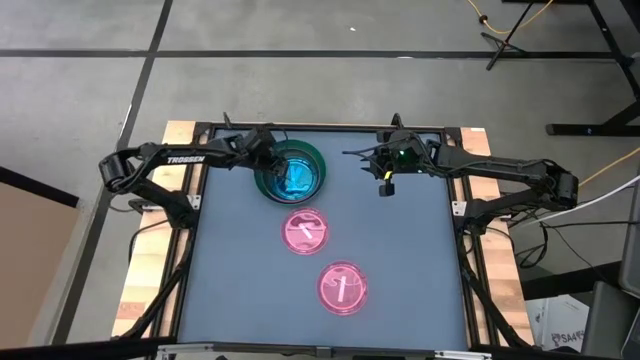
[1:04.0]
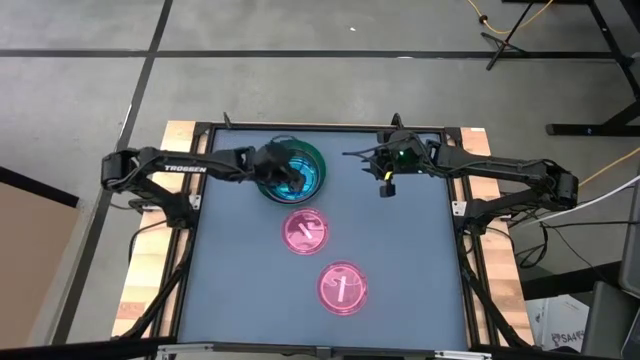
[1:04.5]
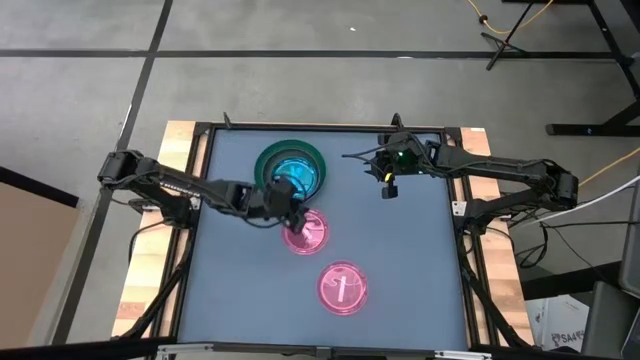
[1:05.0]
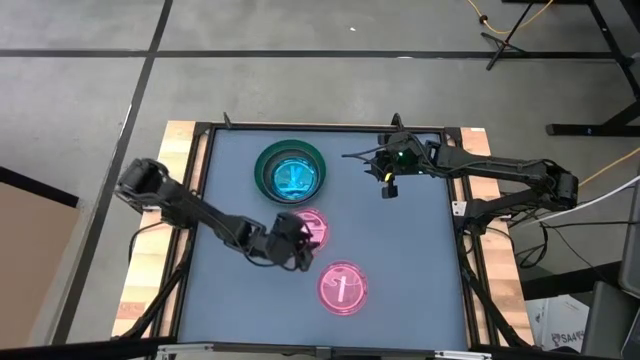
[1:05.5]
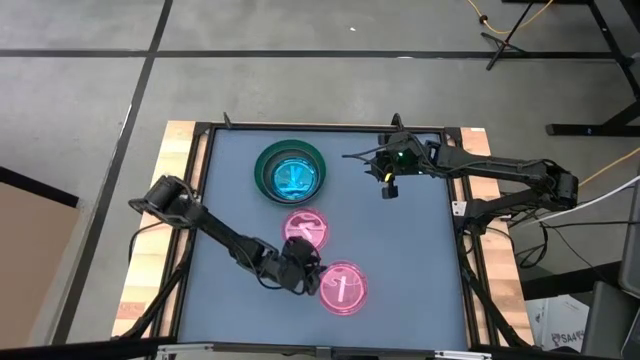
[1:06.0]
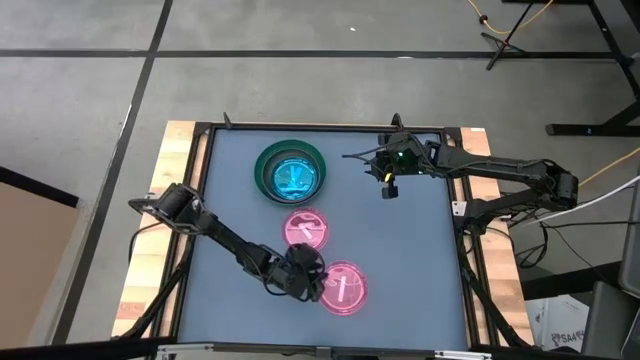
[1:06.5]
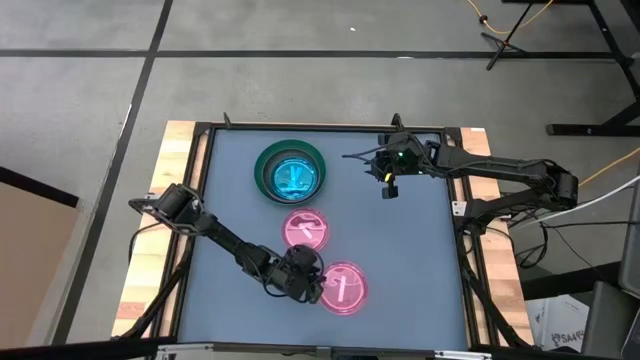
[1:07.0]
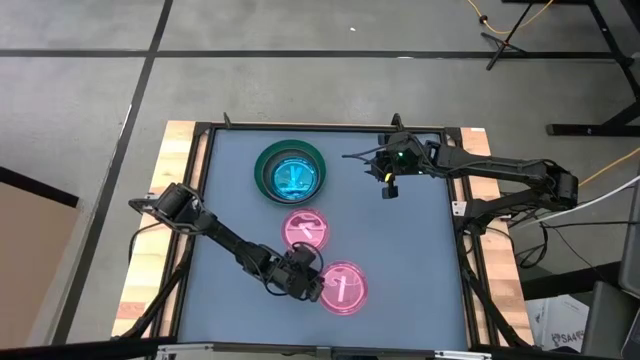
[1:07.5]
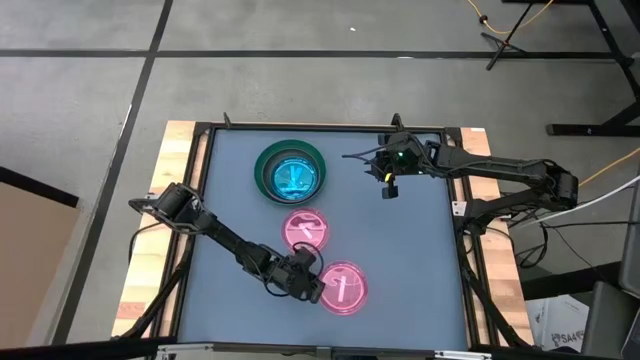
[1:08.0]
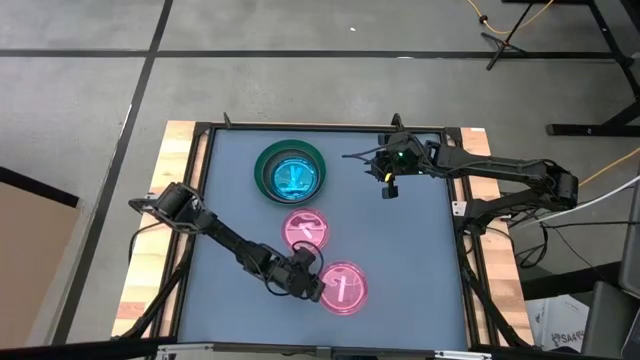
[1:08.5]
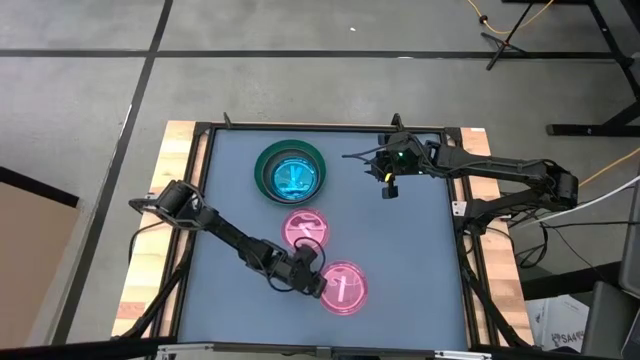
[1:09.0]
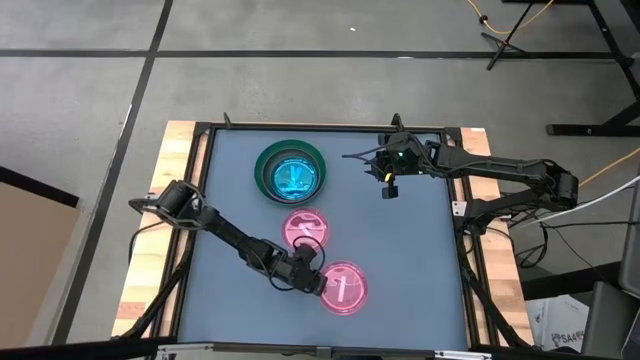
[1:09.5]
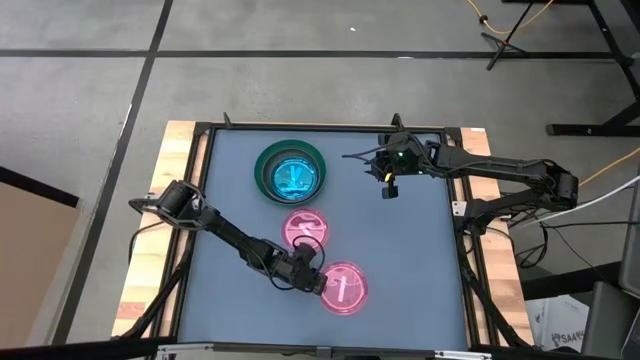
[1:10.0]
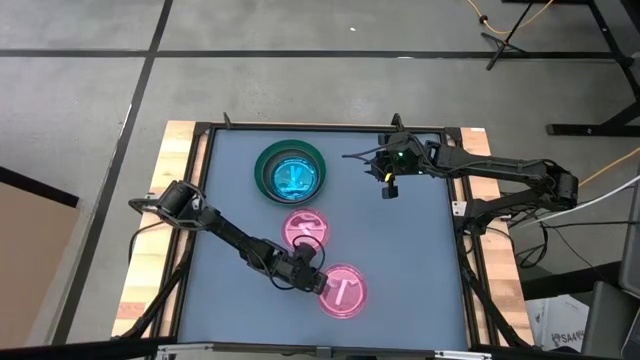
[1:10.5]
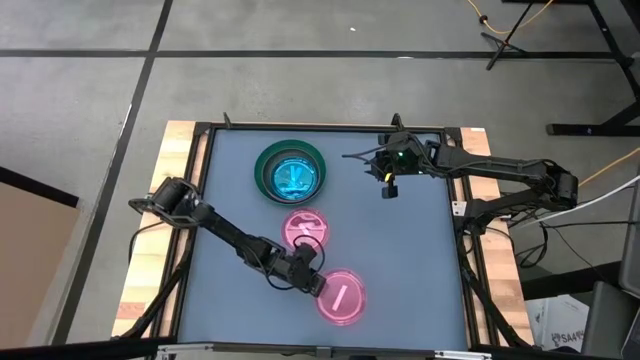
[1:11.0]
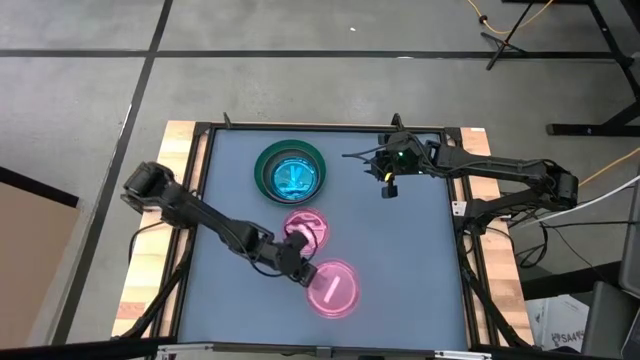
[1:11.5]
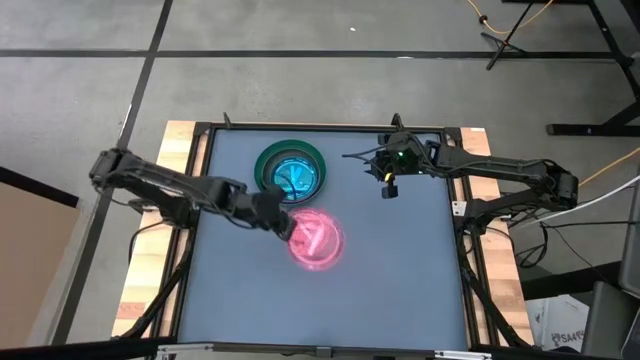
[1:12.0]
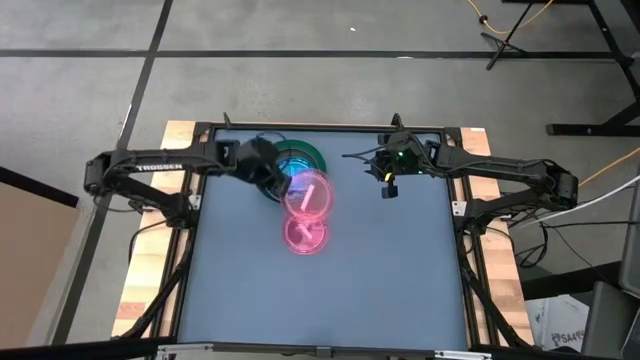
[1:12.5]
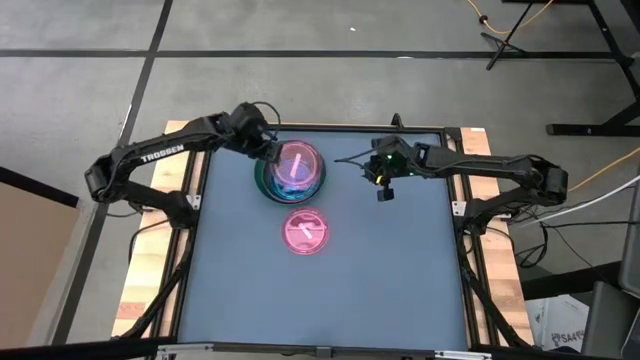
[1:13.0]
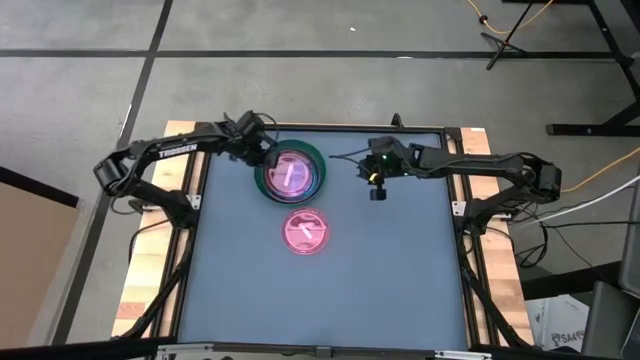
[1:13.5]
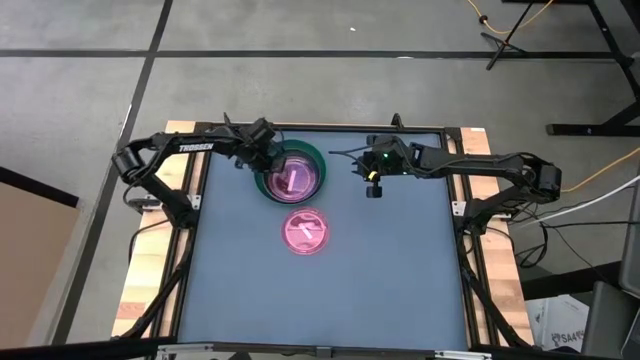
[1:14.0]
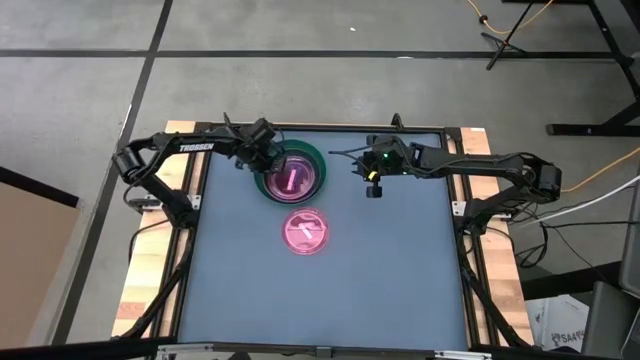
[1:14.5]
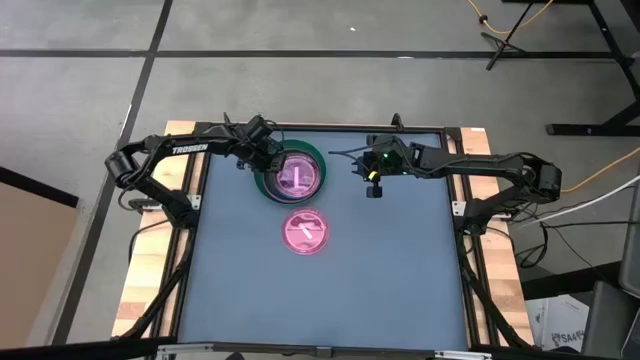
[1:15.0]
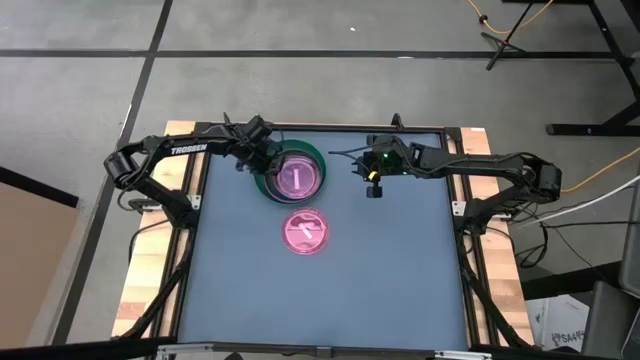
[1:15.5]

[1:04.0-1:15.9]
Task: Stack plastic plates
Stack the bottom pink plate on the blue plate

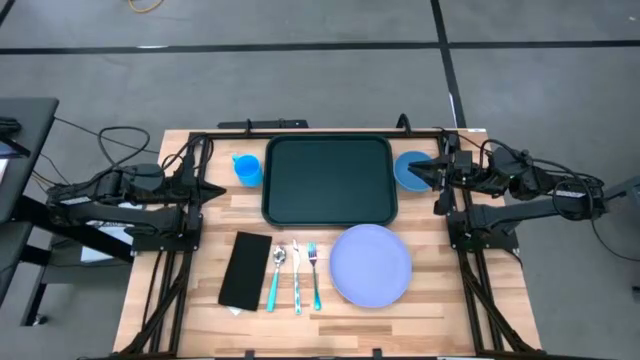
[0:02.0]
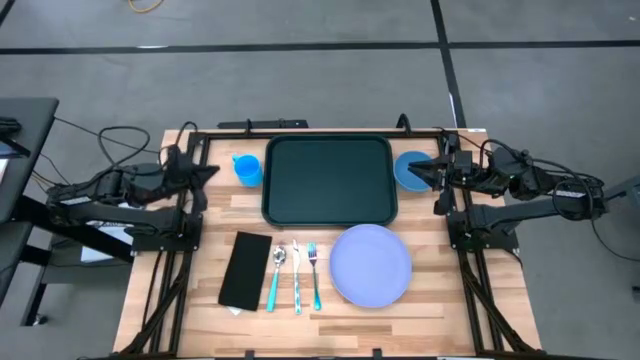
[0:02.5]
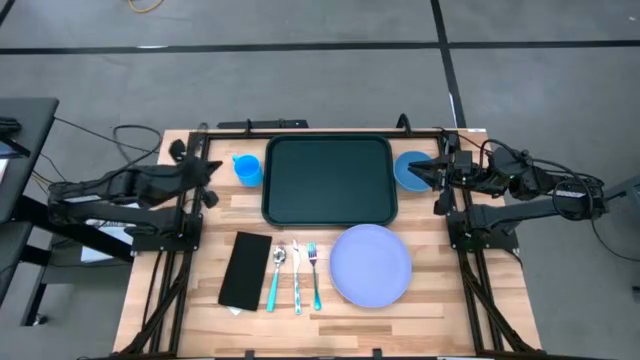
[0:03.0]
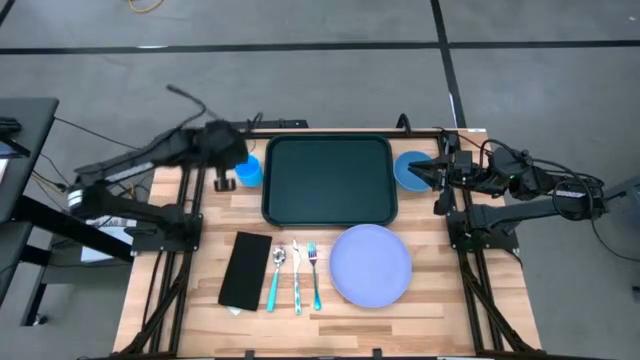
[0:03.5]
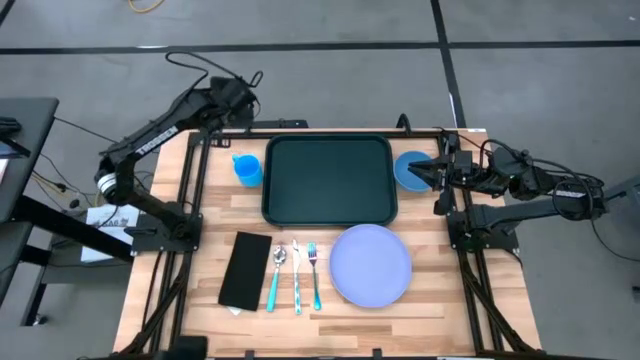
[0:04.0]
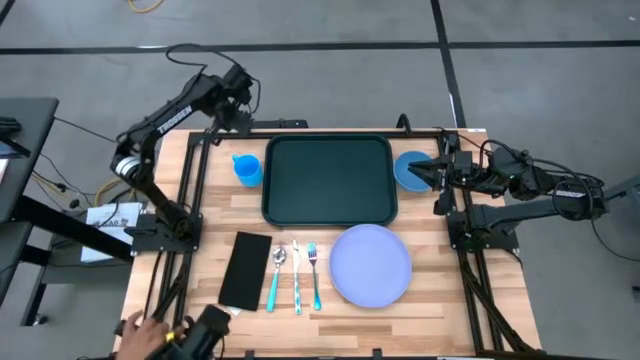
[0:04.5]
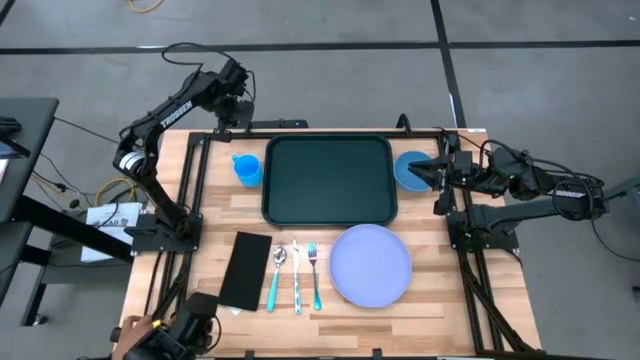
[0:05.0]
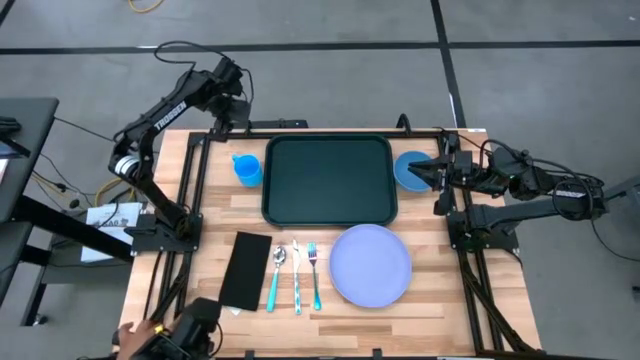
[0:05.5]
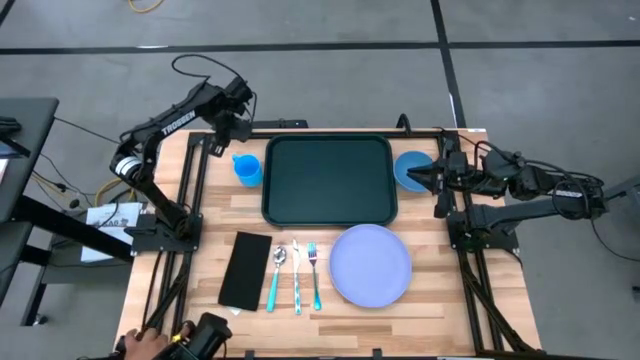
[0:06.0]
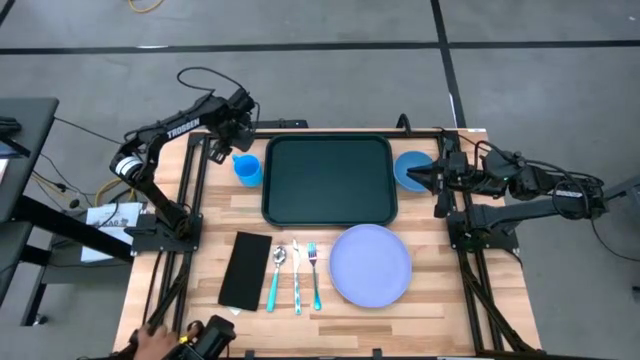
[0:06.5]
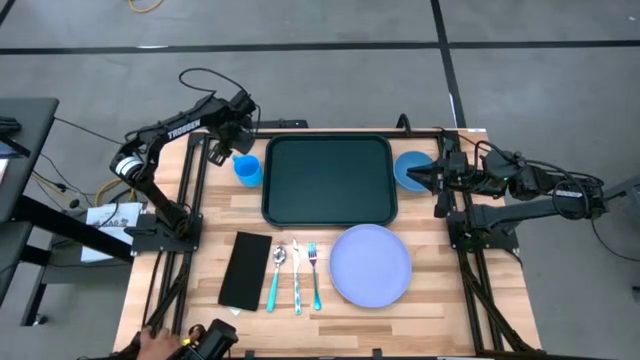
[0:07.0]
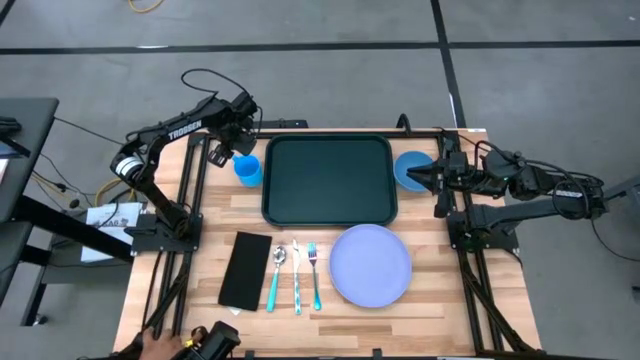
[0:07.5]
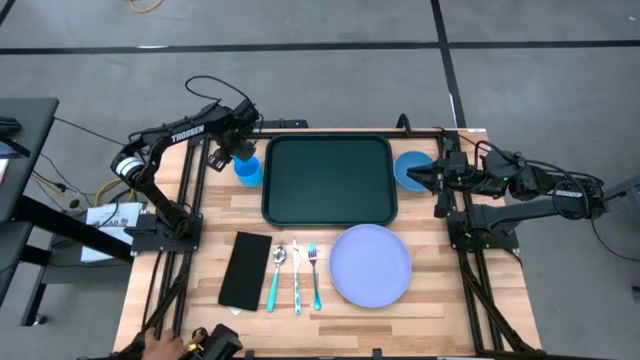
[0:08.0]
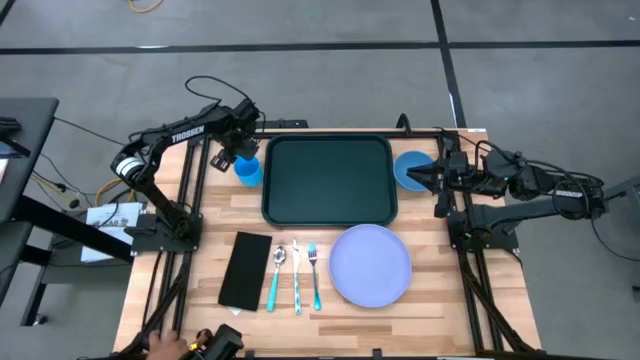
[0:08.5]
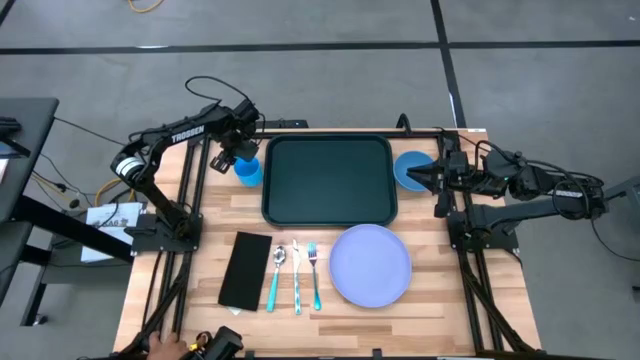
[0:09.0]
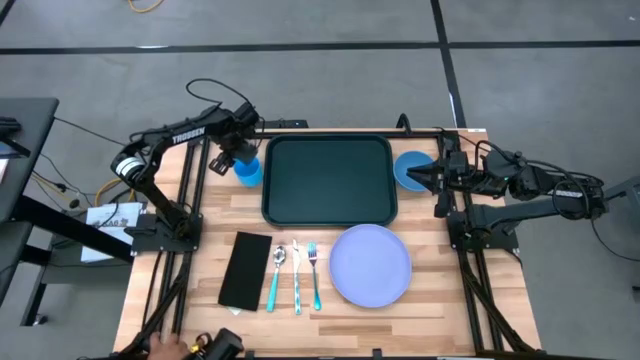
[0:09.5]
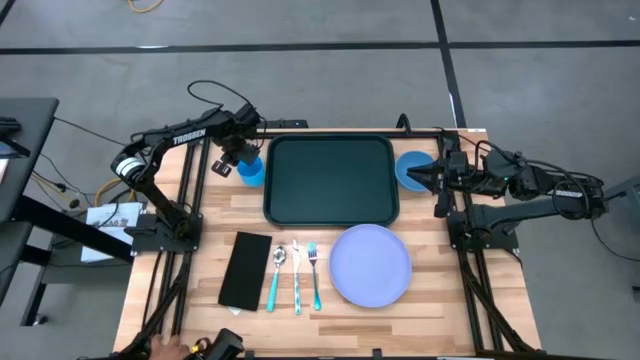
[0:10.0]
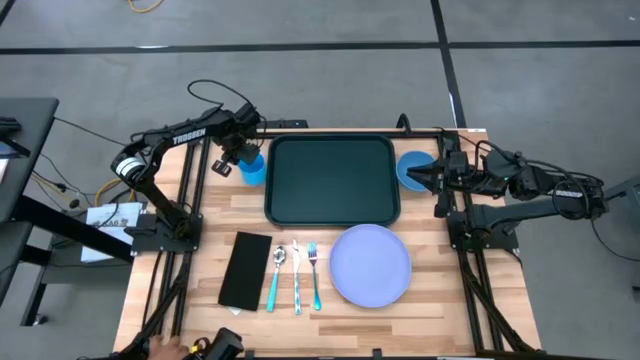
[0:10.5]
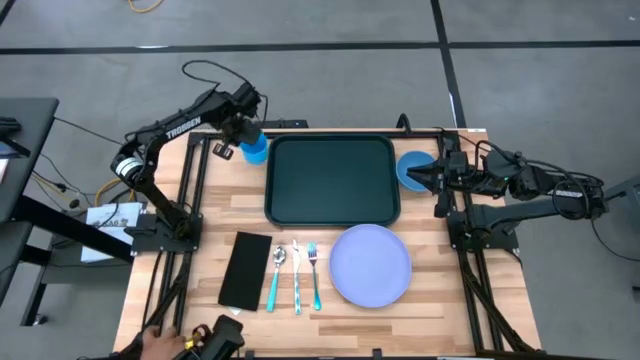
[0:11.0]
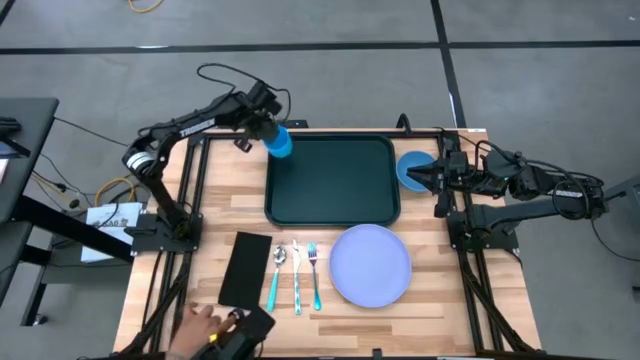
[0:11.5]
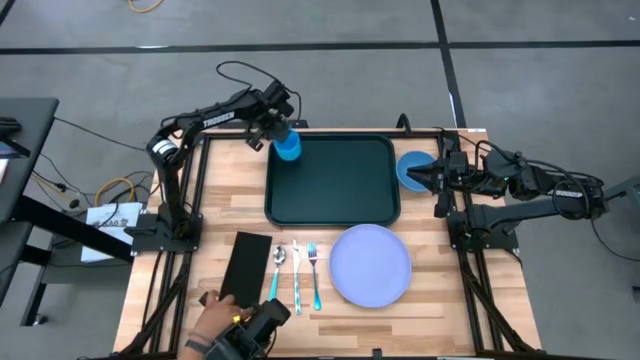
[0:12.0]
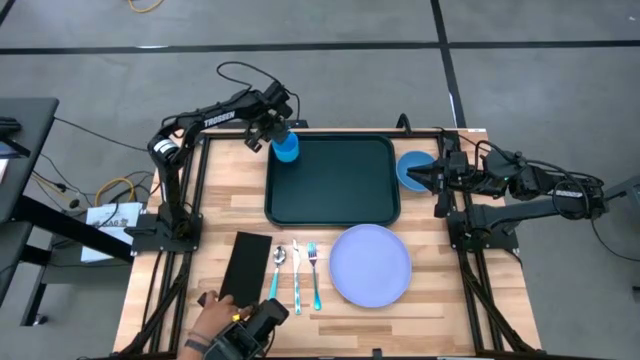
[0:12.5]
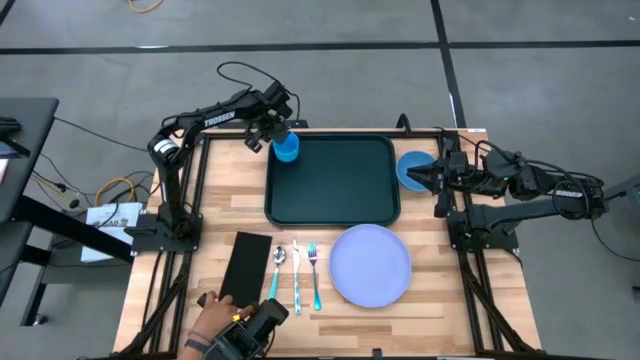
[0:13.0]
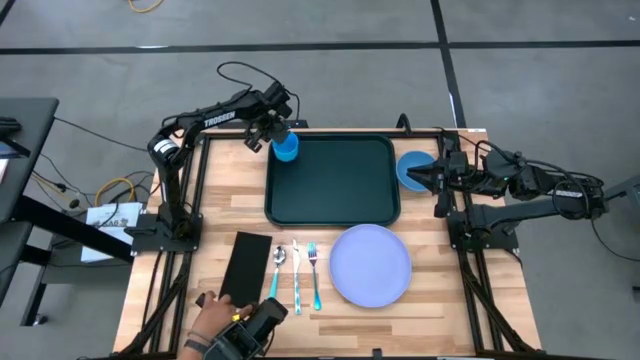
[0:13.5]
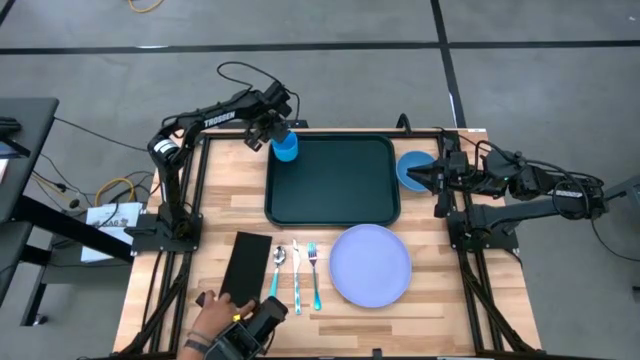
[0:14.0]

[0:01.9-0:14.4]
Task: Set up tray
Put the cup on the top left of the tray
